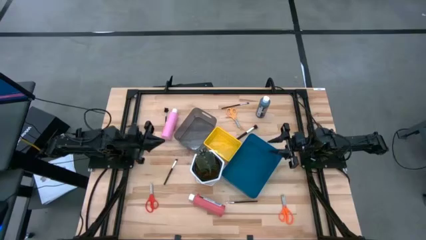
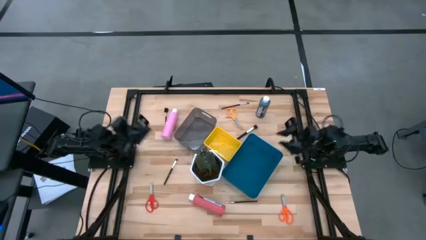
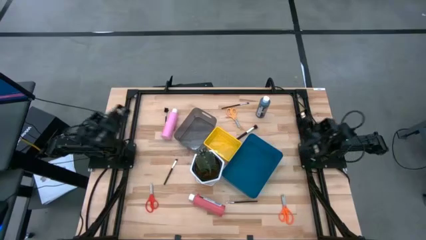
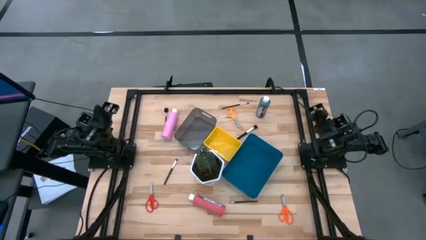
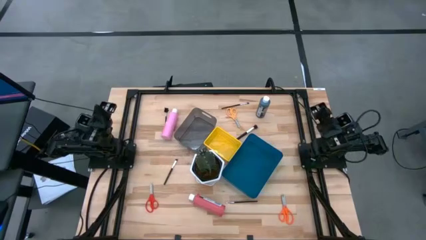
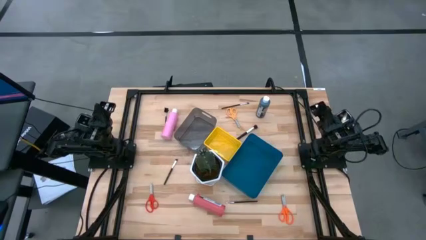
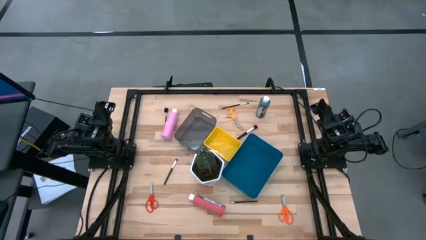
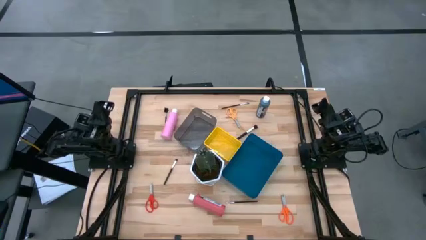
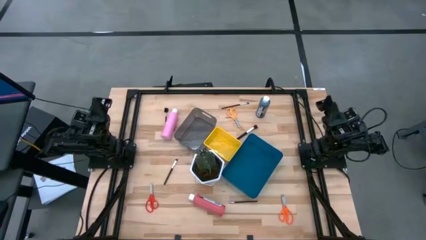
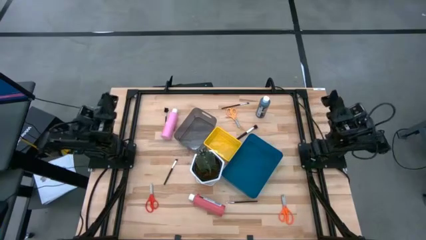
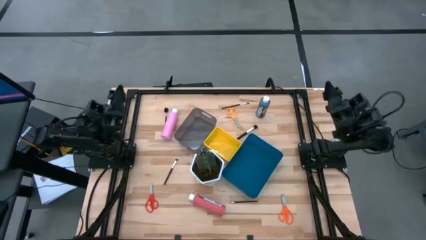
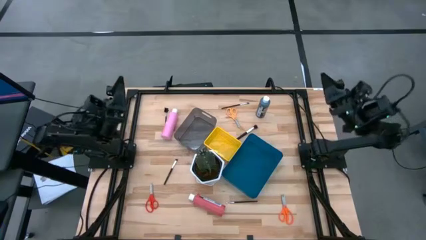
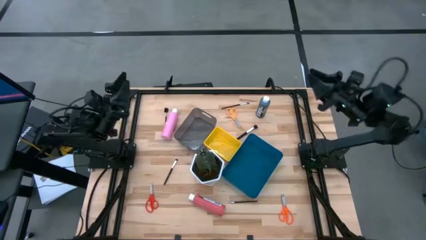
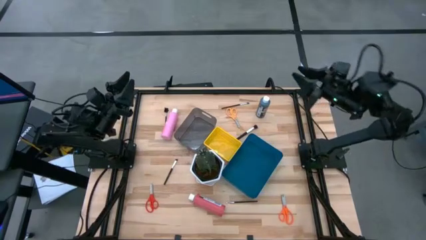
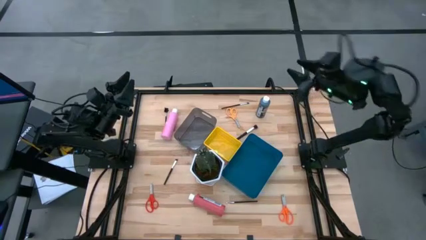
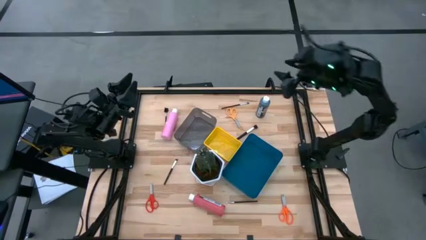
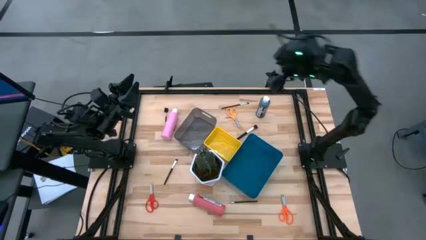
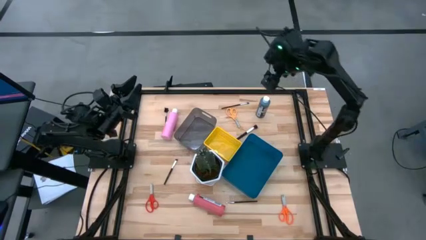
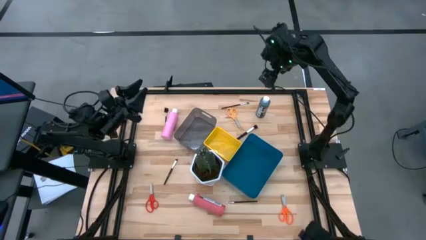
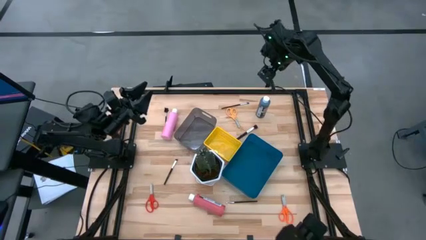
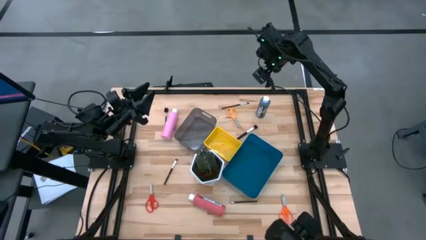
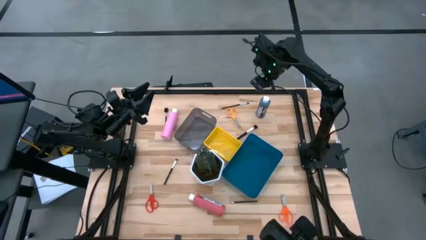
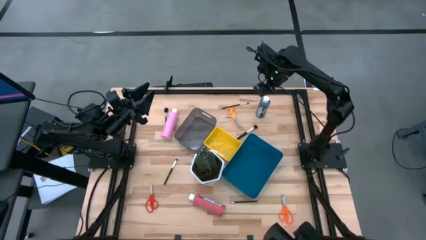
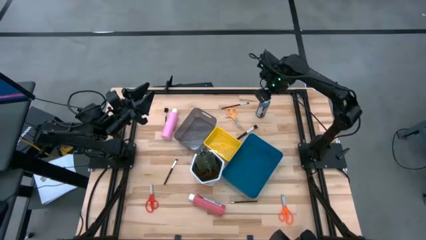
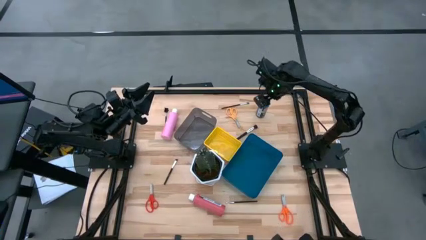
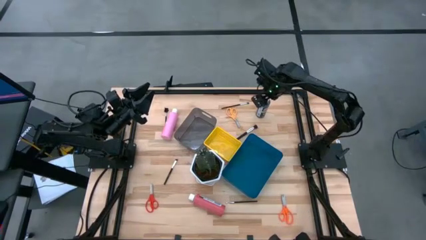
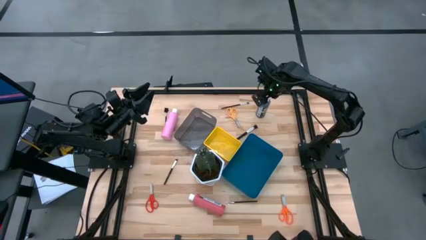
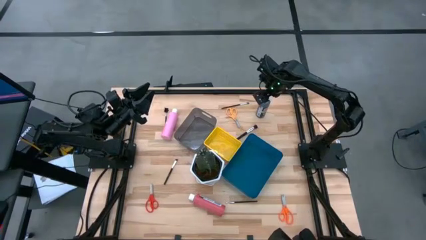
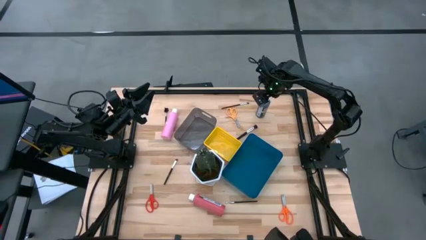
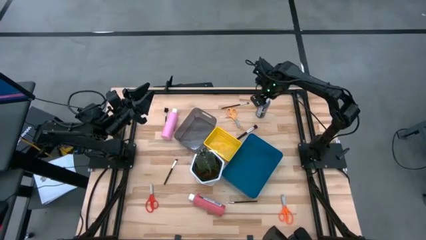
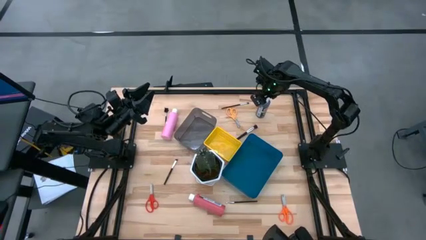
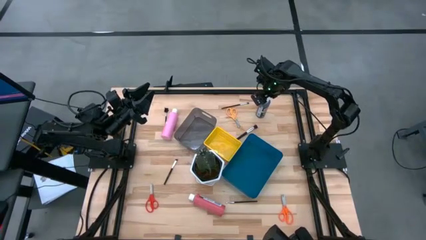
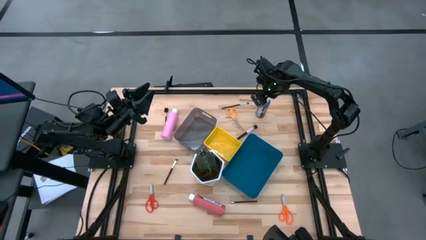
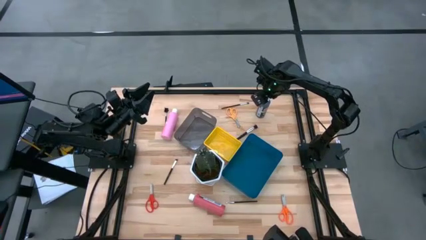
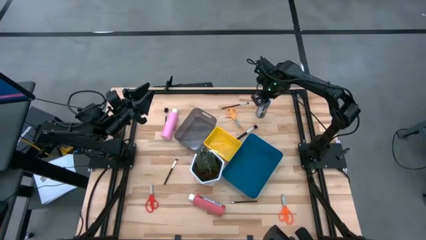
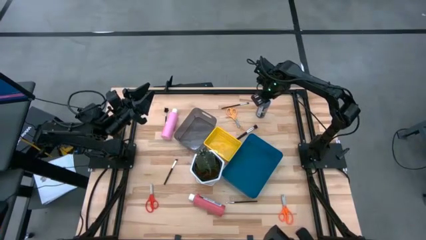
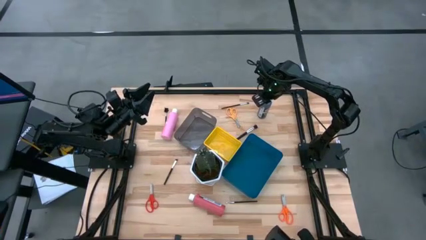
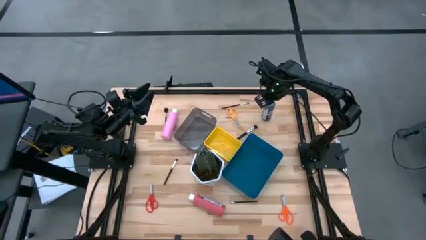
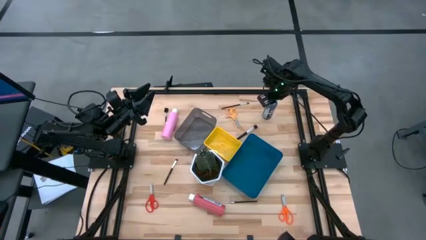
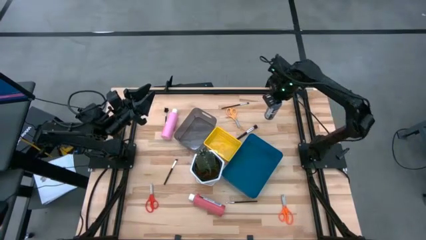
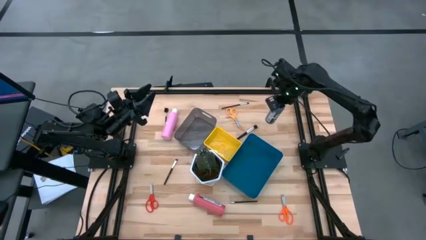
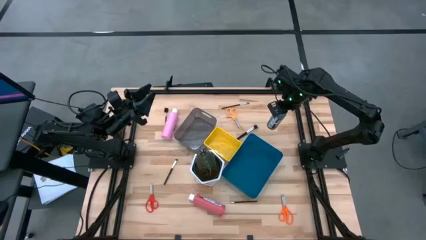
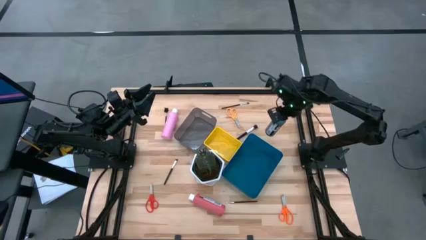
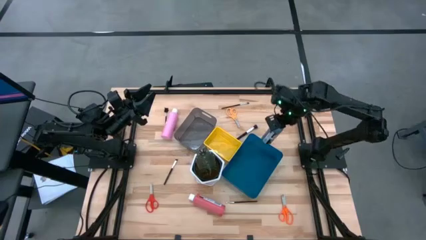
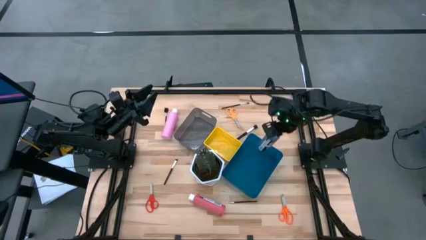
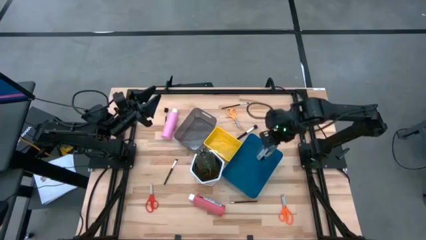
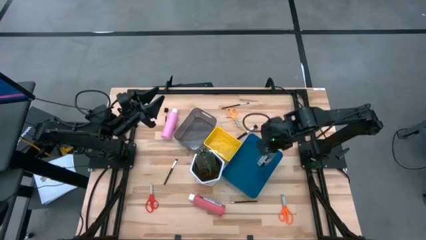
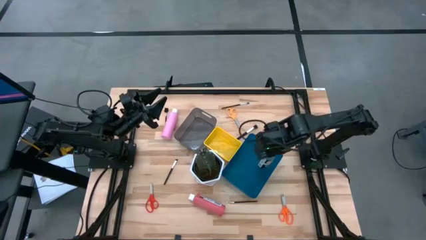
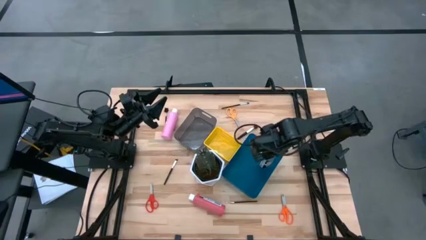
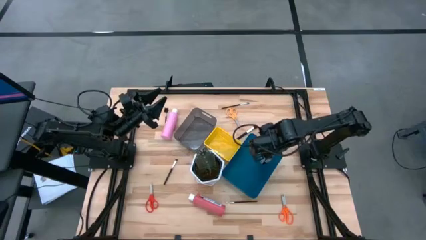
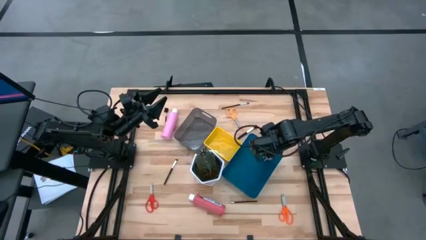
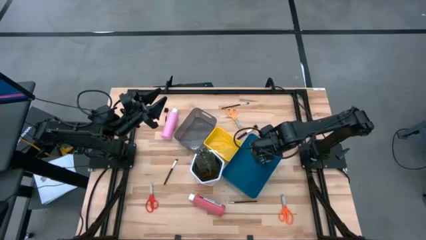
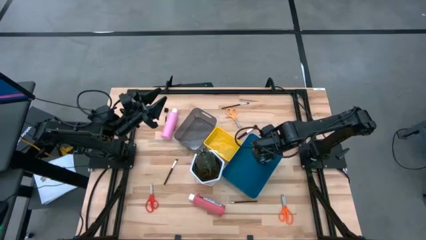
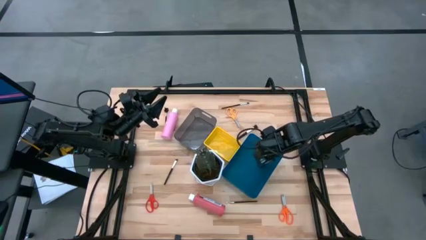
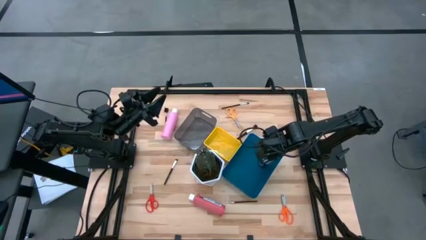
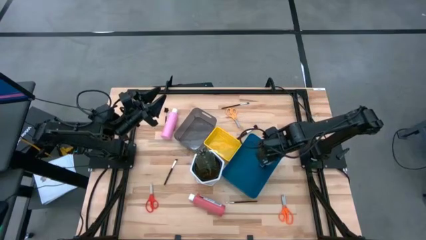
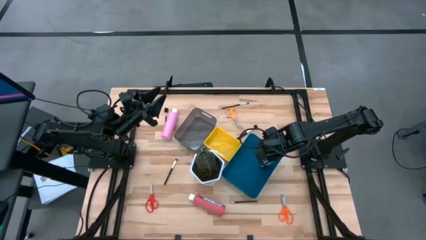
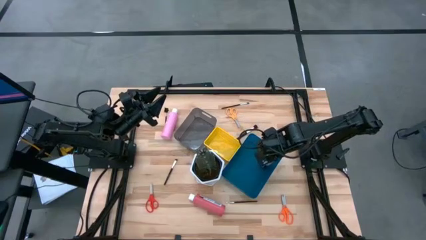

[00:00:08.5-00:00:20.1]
Task: Pick & Place Paint Supplies
Put the blue paint bottle into the blue bin

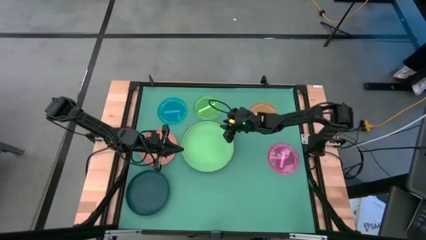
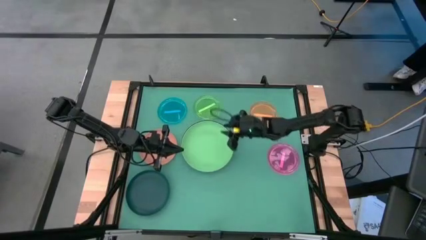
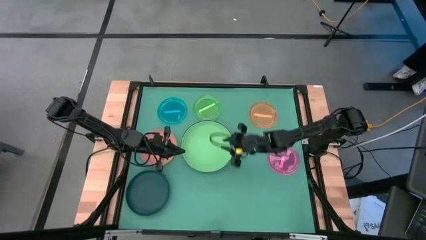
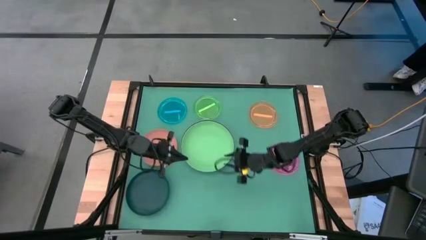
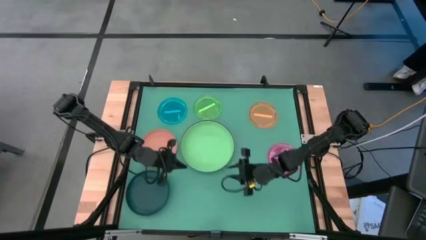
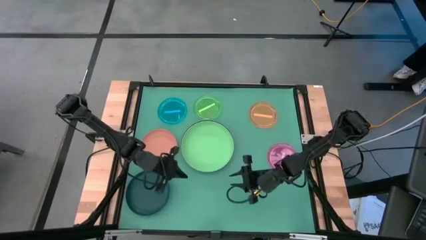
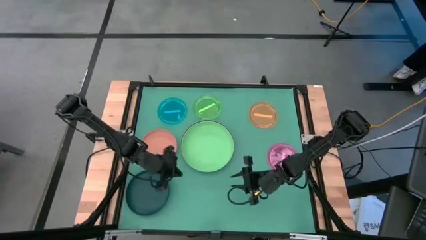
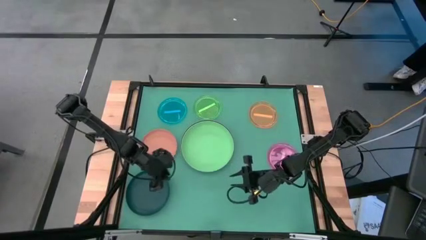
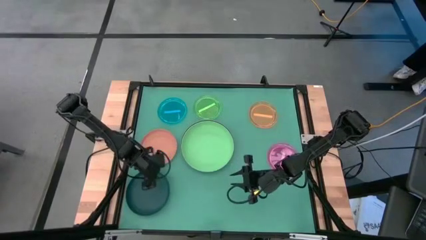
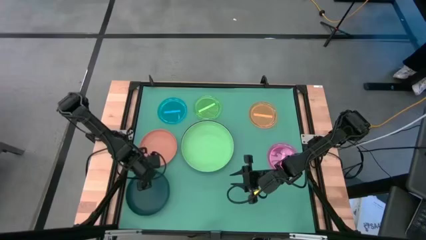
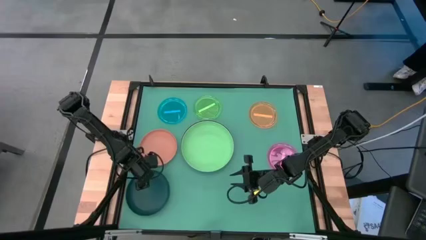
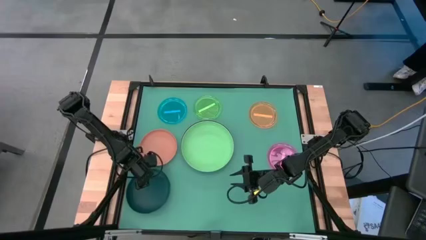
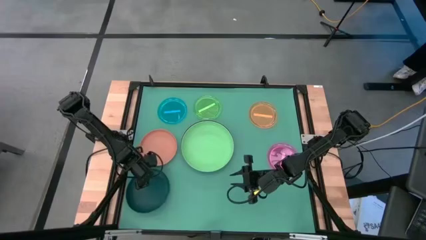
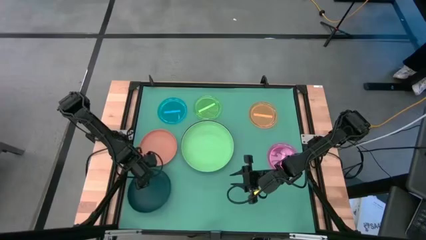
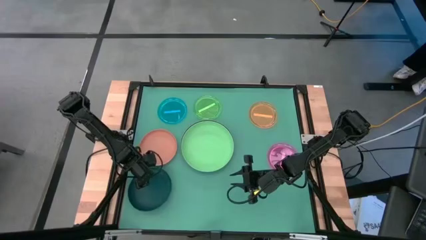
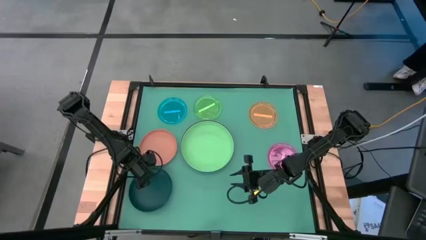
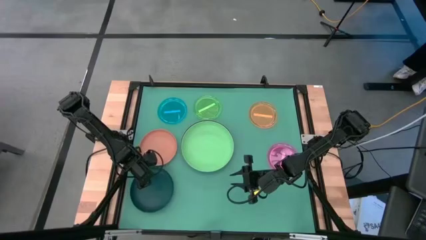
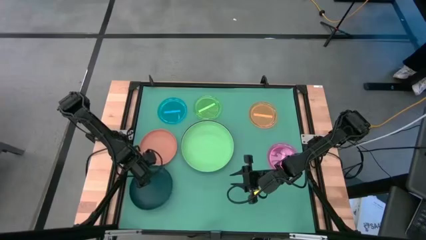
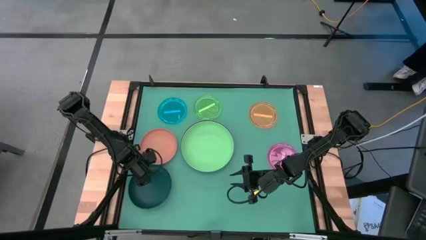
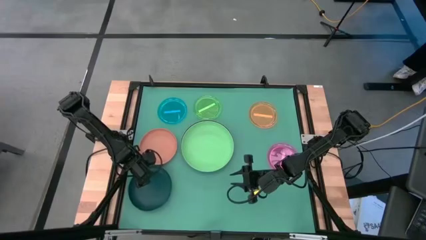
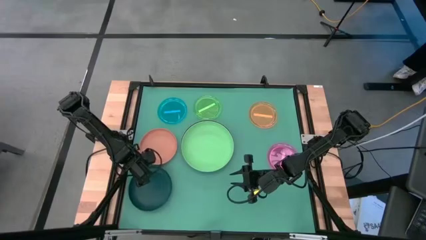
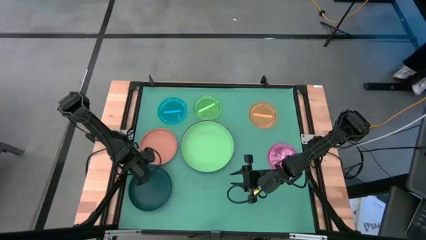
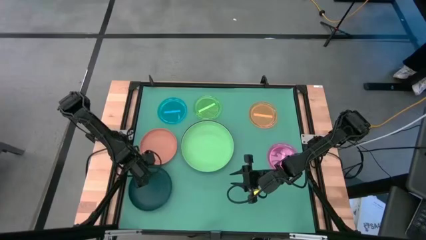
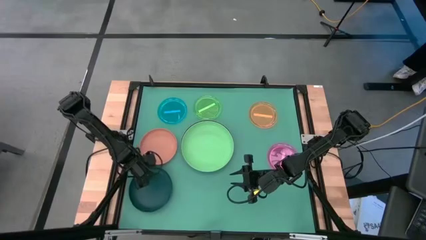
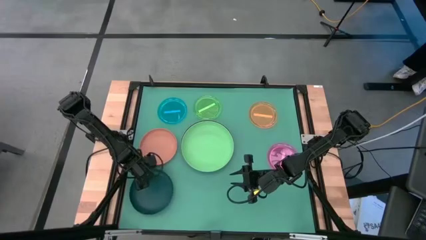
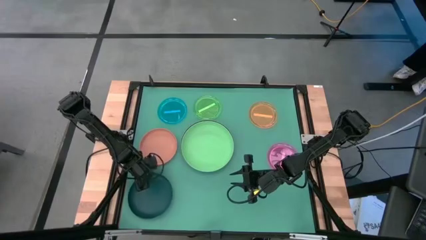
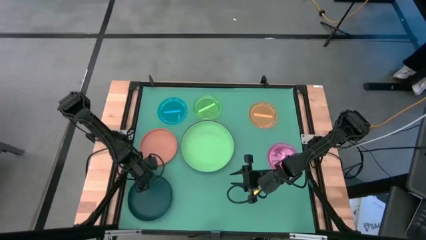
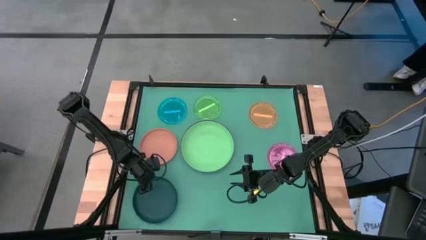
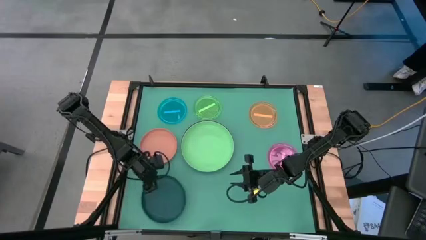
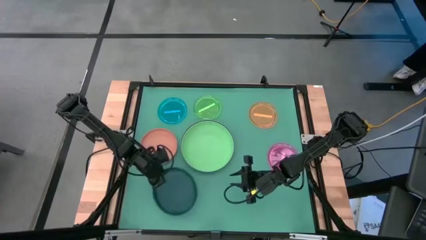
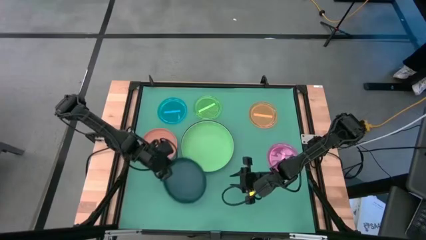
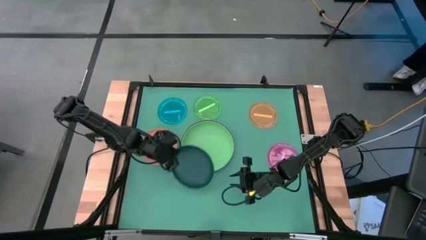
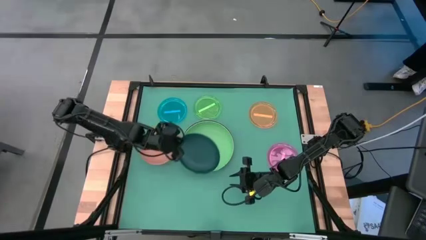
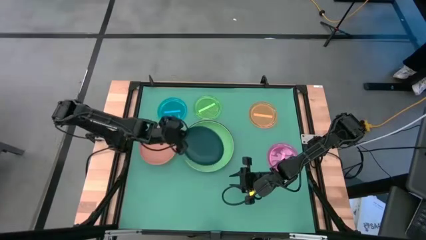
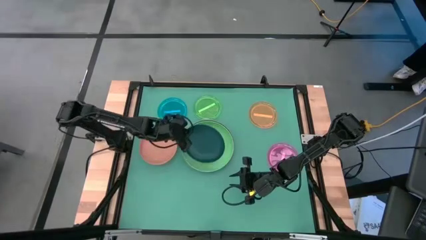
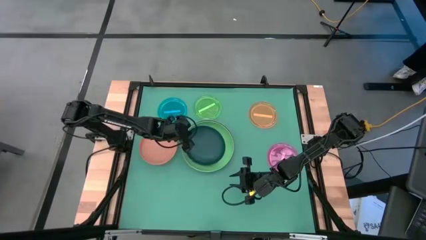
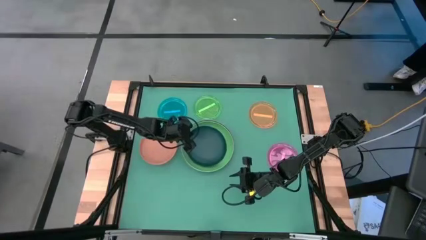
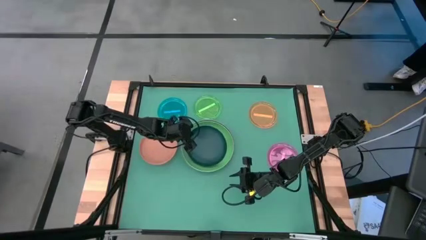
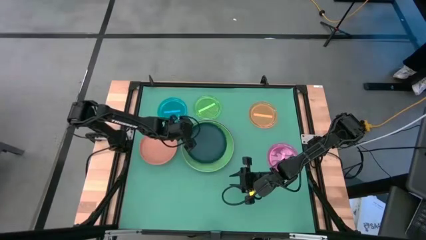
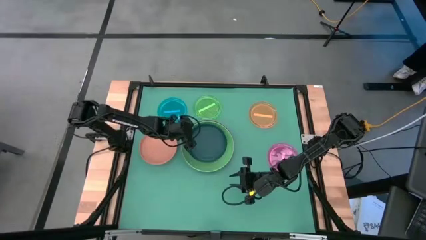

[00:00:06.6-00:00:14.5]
Task: Stack plastic plates
Stack the dark green plate on top of the light green plate
